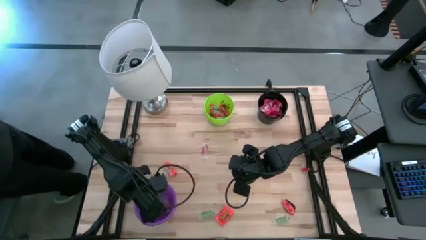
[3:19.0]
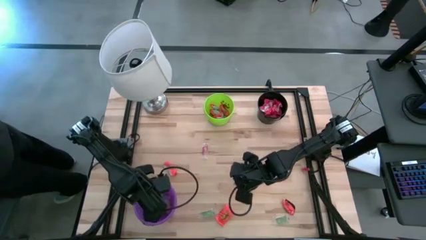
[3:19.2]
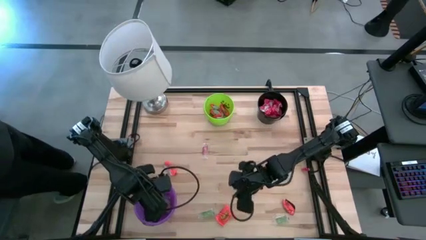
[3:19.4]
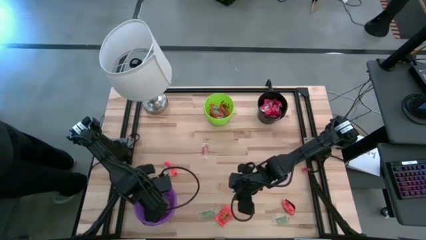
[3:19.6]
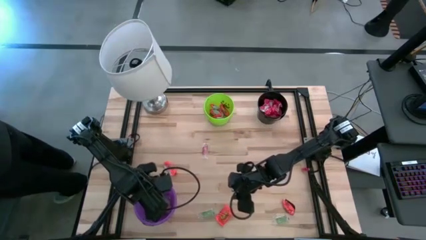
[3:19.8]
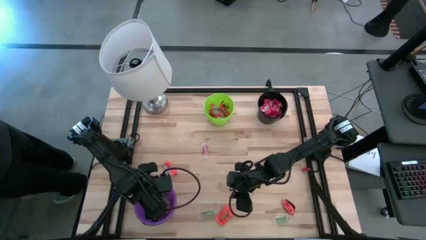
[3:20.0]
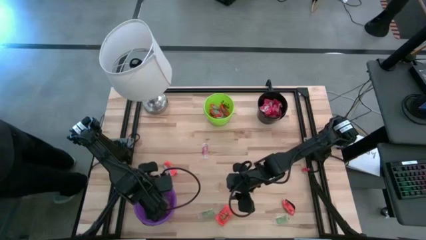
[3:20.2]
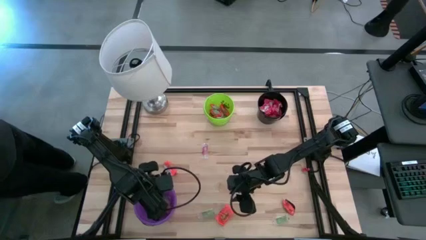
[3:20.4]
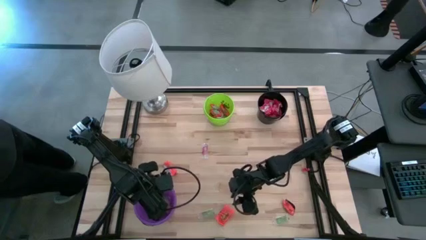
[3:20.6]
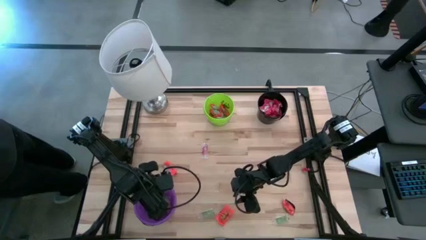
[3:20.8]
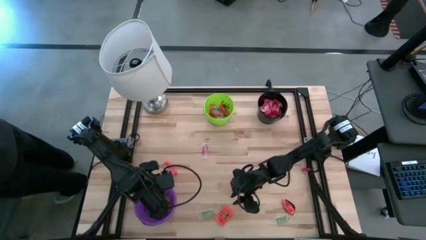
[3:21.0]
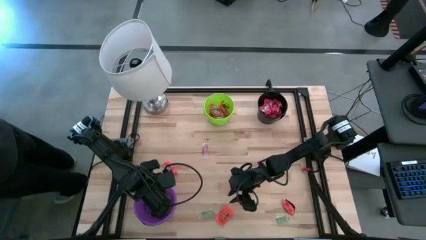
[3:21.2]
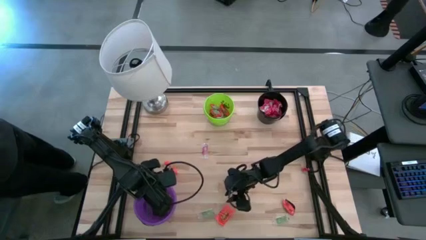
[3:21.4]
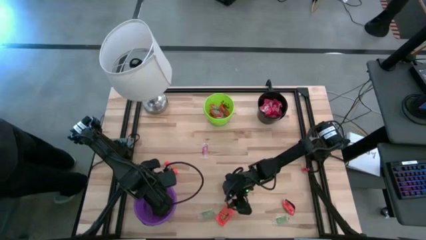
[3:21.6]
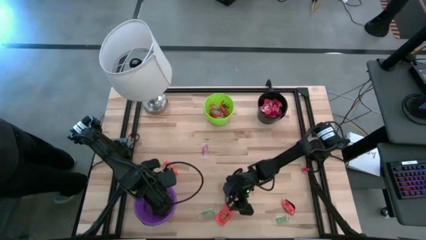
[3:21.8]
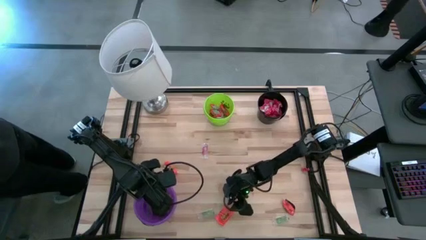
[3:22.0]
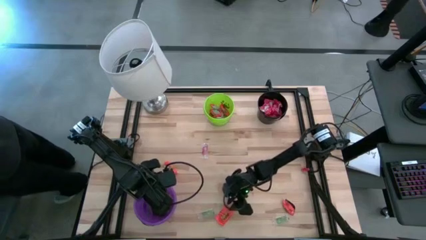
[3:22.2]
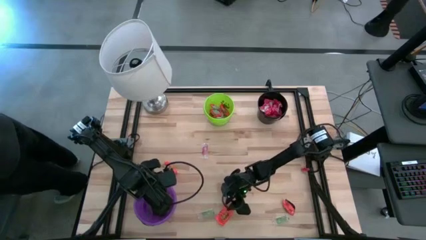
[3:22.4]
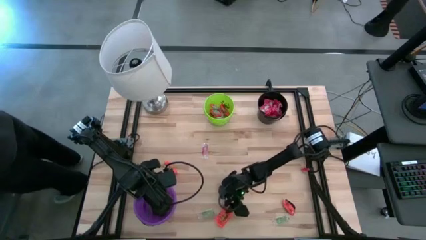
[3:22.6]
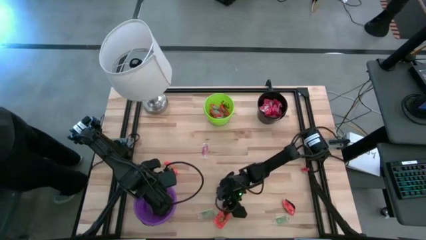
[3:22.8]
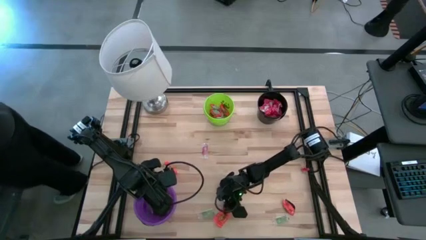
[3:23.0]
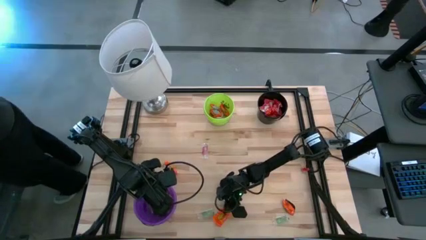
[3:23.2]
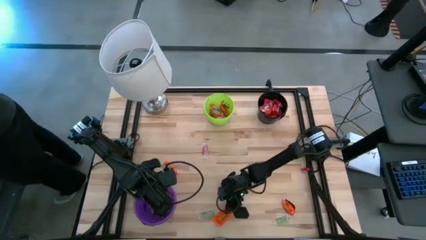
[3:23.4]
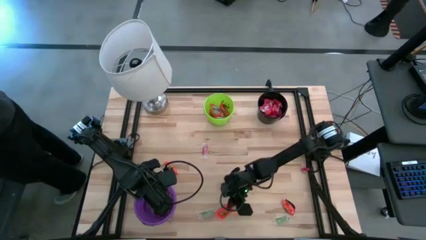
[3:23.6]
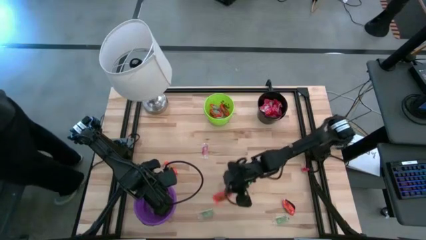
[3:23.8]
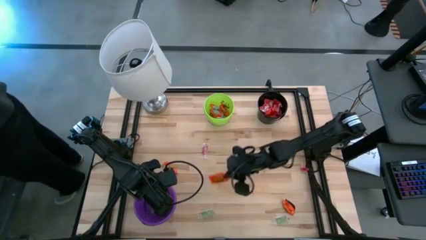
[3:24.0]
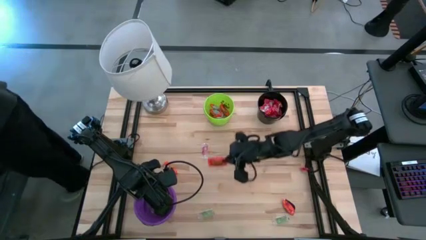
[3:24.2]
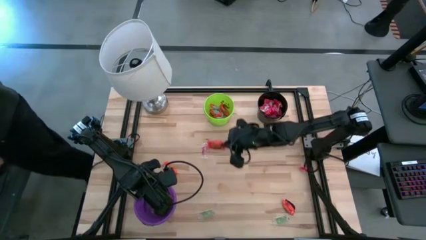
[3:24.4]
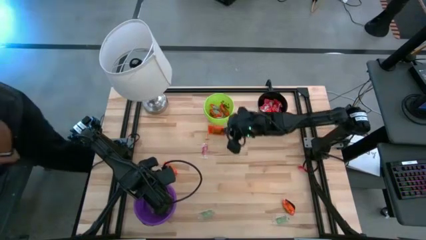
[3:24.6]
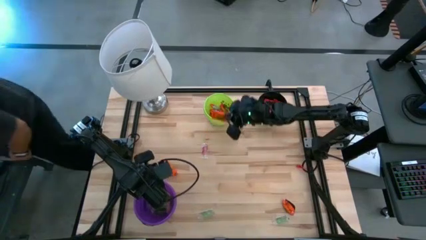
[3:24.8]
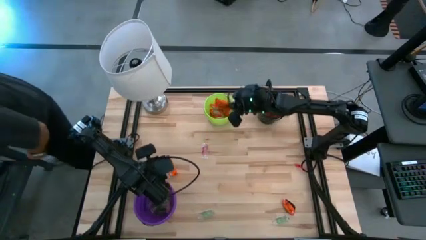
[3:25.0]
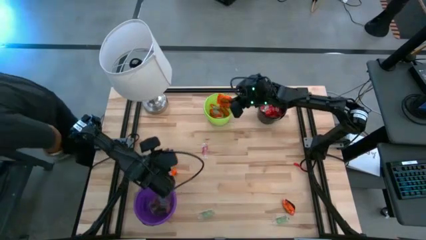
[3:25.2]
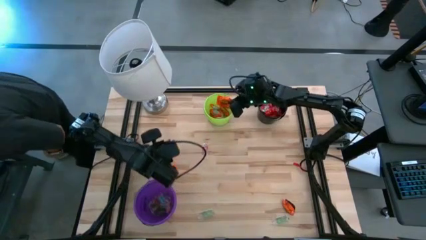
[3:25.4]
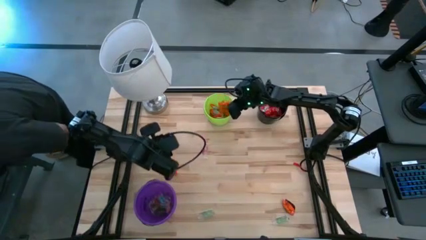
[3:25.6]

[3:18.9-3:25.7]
Task: Sort candy
Put the orange chocolate into the green bucket

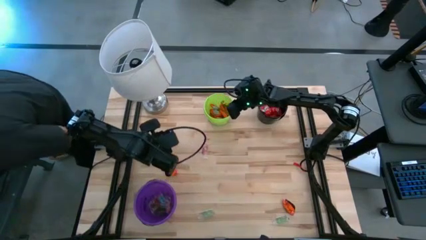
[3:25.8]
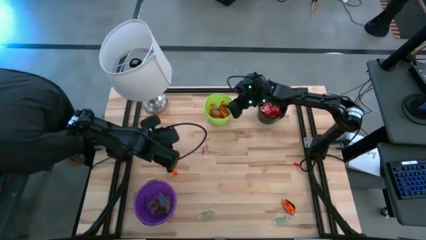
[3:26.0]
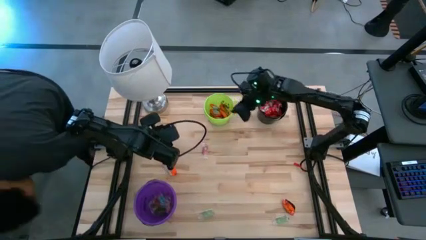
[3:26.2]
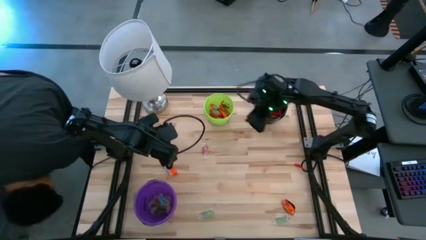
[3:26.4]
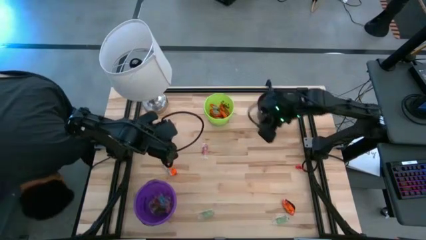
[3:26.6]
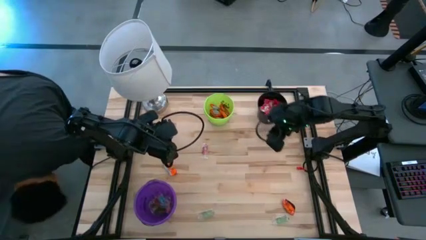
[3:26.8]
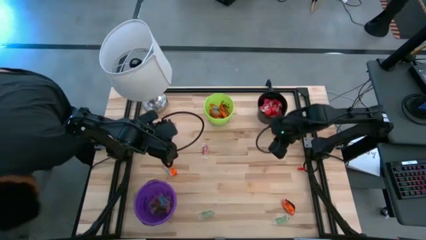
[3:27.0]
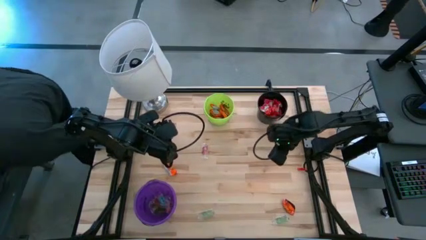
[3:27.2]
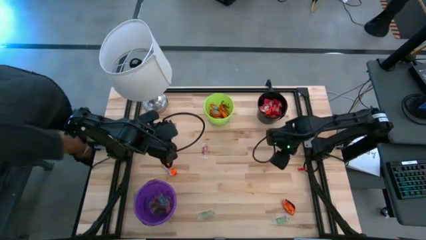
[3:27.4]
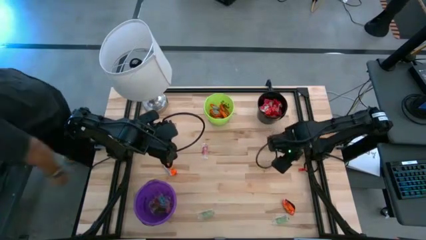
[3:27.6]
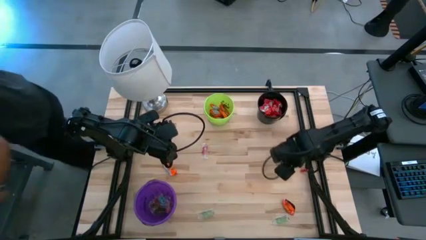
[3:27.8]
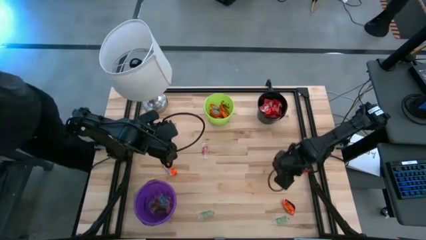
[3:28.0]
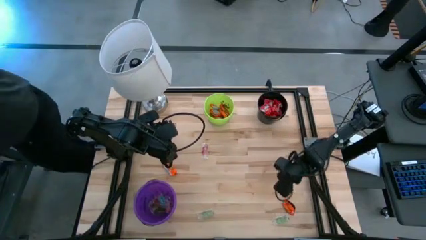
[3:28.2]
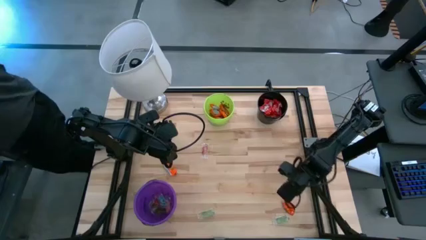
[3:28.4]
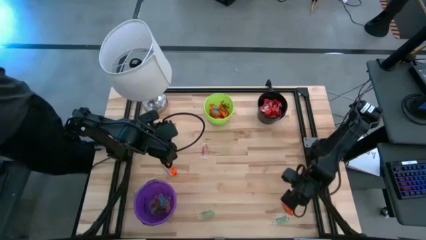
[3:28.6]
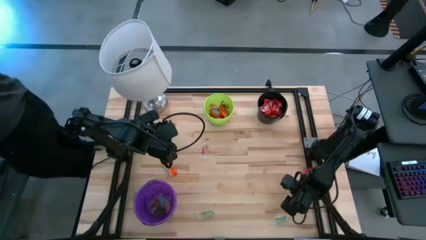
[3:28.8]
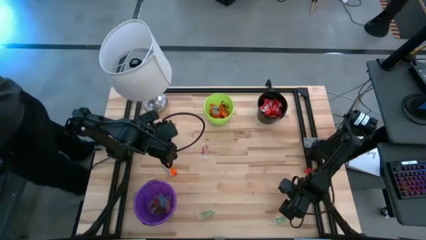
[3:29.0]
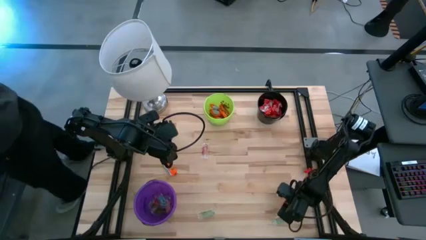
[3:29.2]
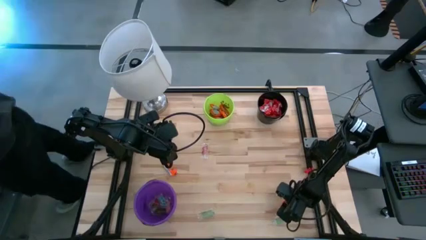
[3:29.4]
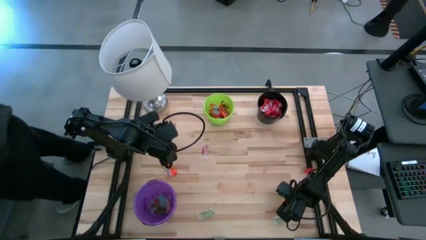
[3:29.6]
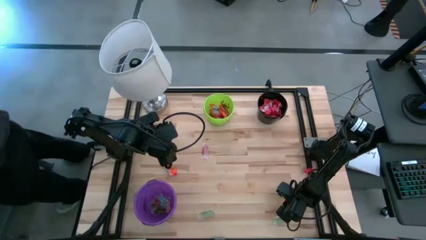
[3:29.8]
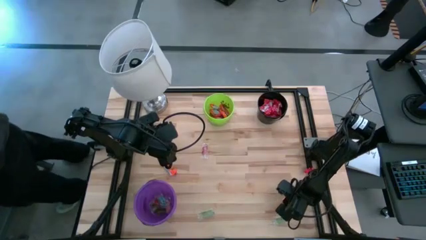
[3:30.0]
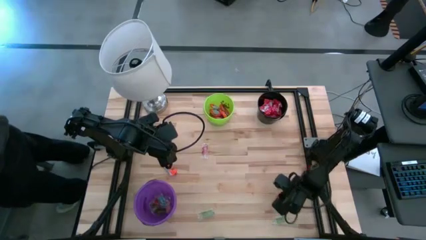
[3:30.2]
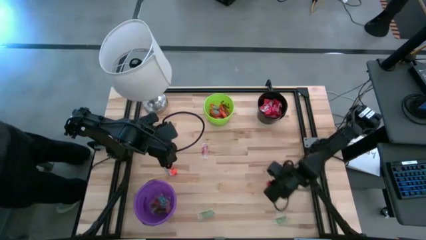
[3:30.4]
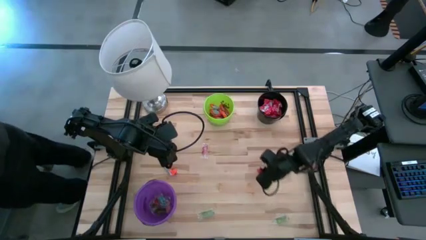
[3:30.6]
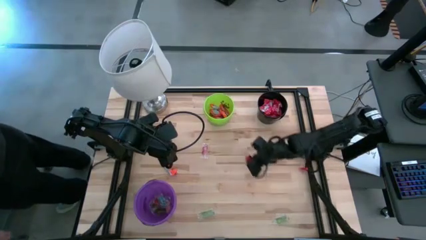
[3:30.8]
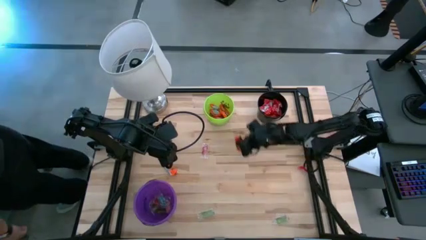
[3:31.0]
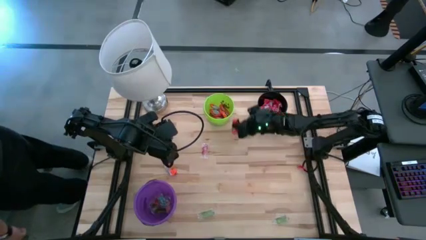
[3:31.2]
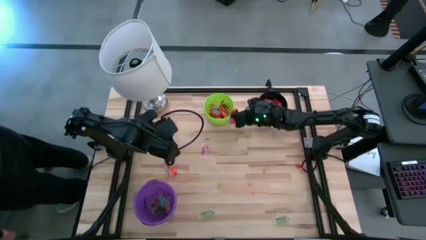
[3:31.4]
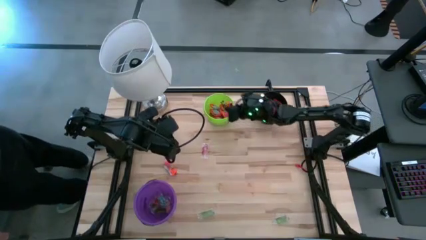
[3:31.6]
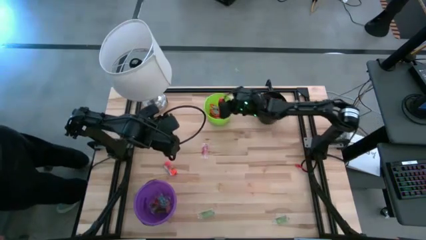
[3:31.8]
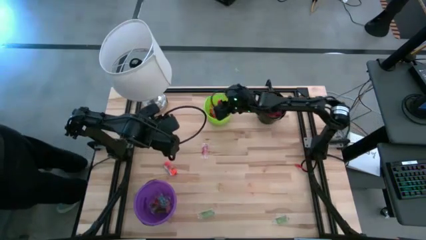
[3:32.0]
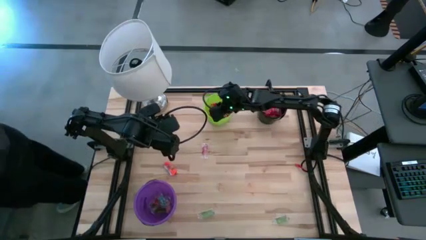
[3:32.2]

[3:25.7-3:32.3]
Put the orange chocolate into the green bucket

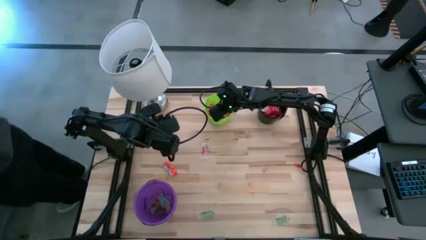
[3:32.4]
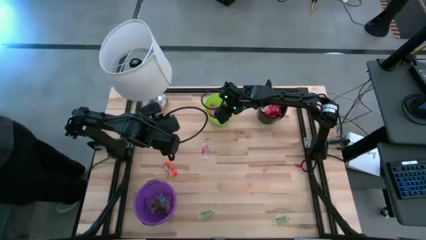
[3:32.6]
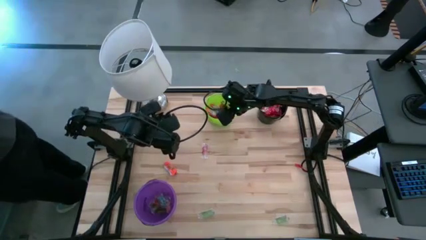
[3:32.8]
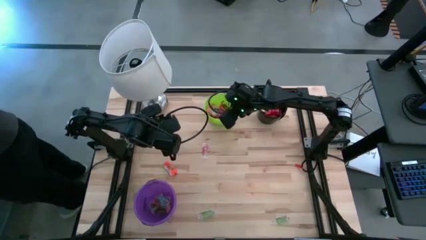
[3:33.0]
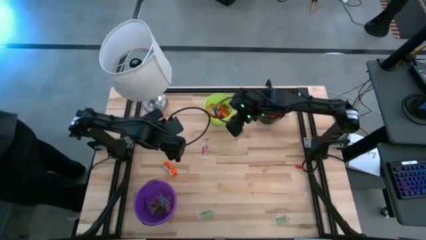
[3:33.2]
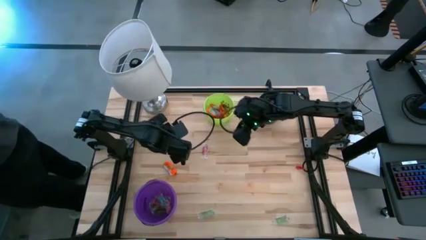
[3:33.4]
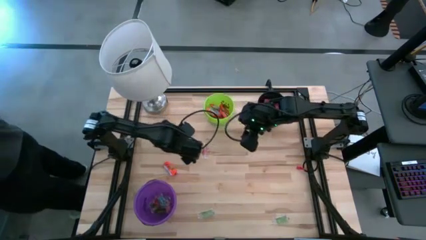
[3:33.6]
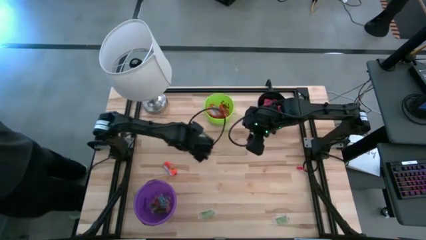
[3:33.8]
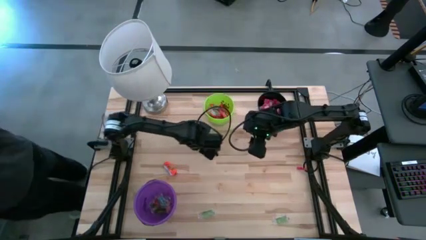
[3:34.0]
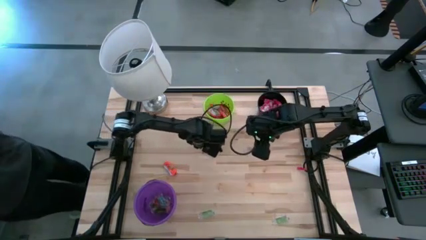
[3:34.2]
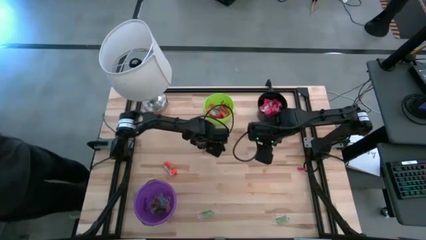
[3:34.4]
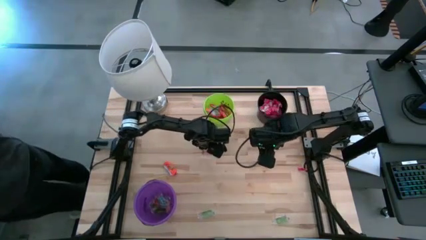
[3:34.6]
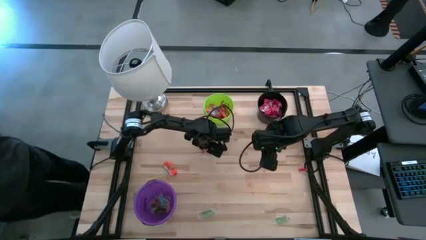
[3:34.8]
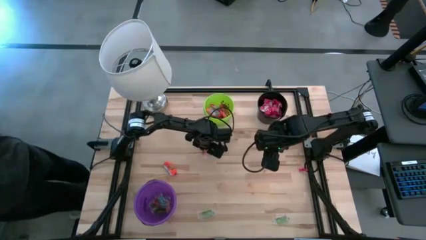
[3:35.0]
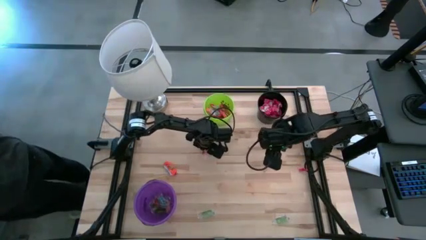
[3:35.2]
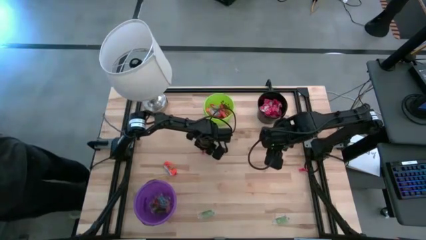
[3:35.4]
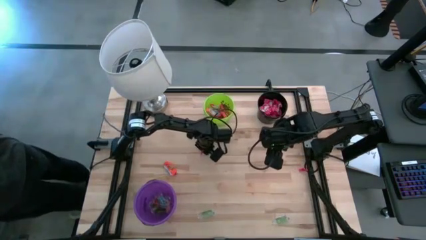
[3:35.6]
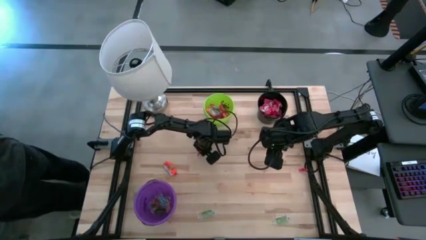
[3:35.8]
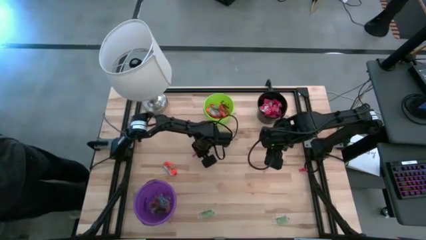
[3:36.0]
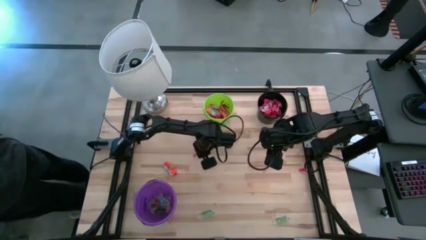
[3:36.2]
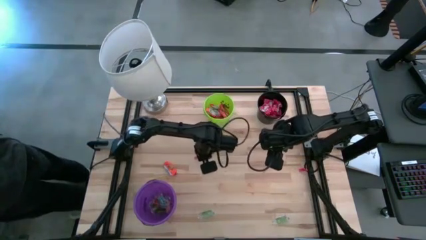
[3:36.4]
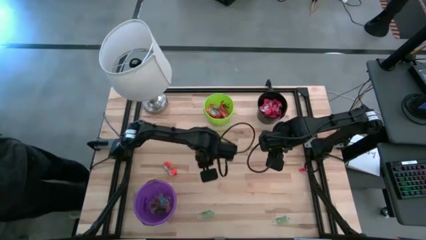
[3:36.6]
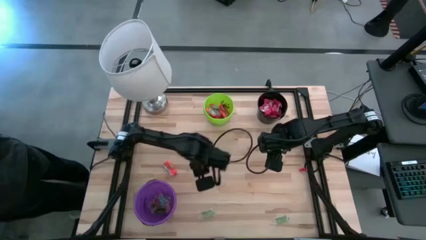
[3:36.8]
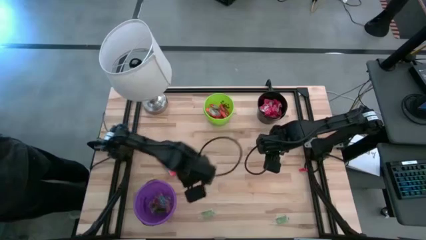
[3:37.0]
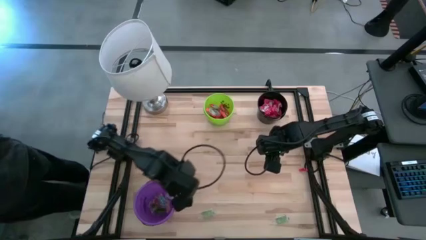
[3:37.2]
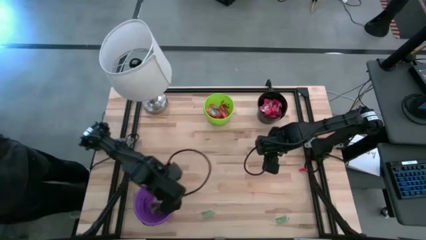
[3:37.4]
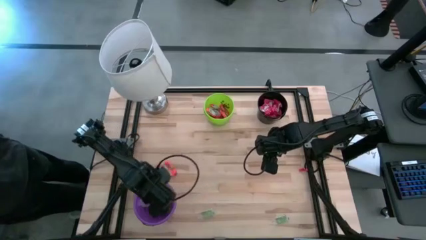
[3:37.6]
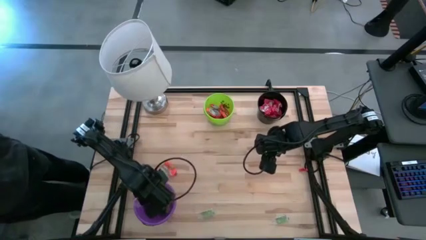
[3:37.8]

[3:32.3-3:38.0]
Put the red gummy into the violet bucket
